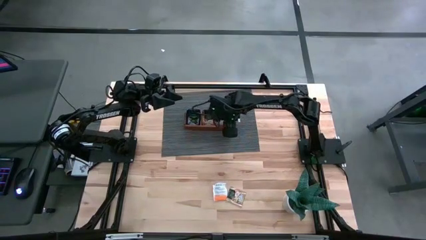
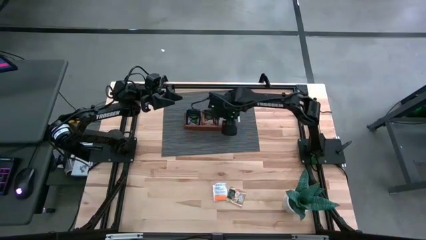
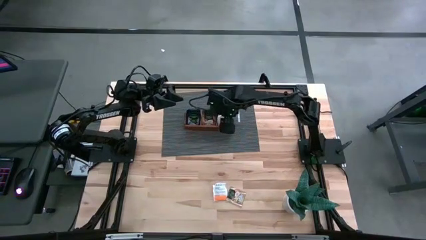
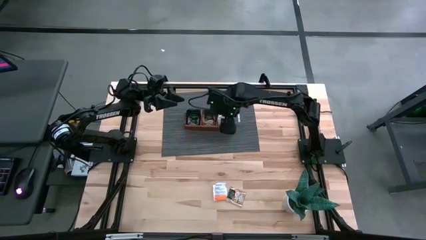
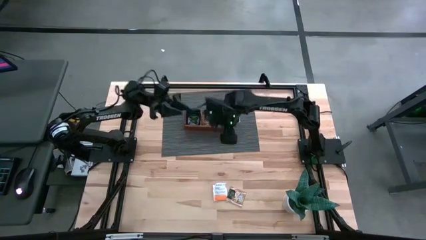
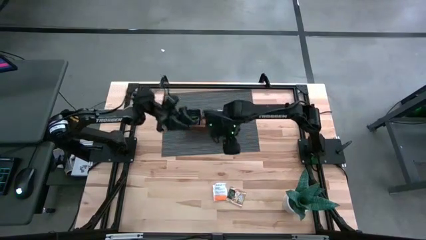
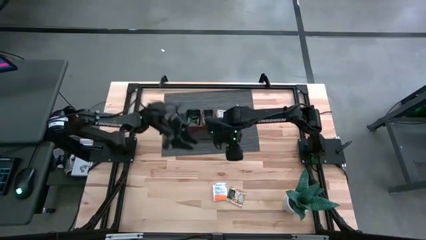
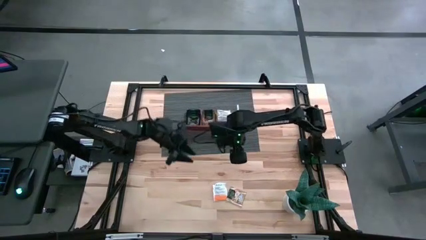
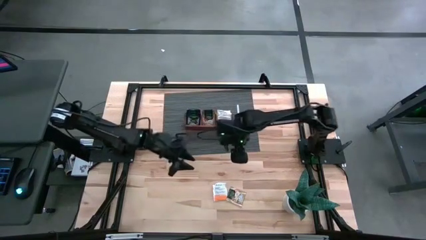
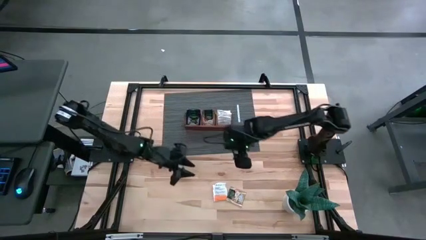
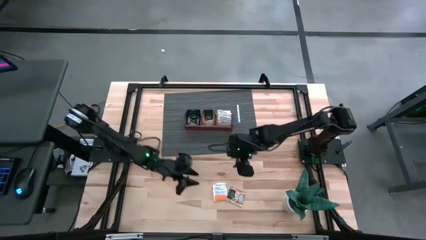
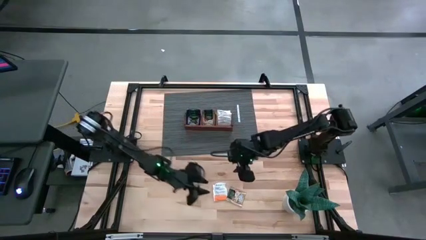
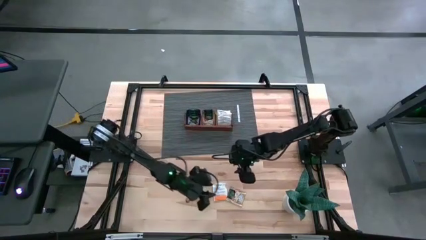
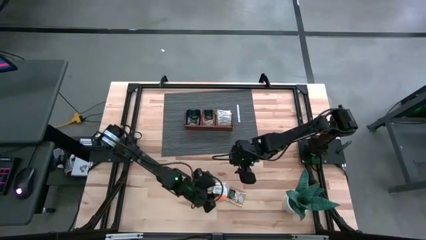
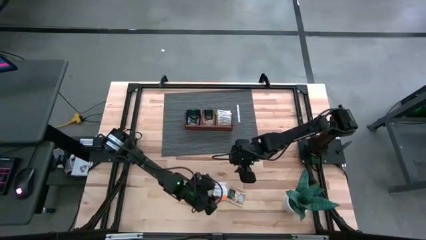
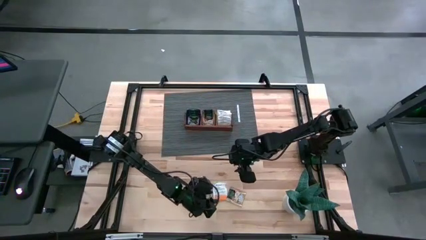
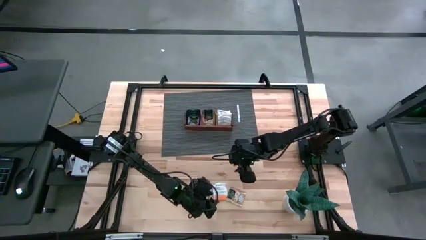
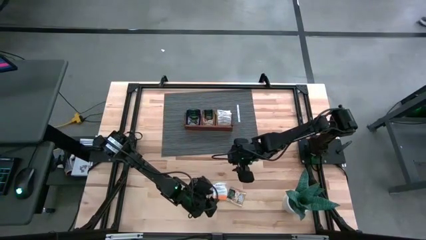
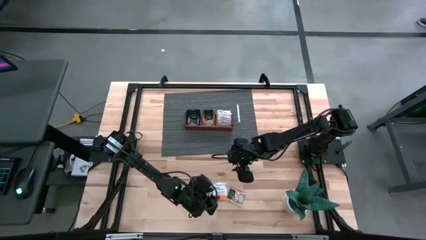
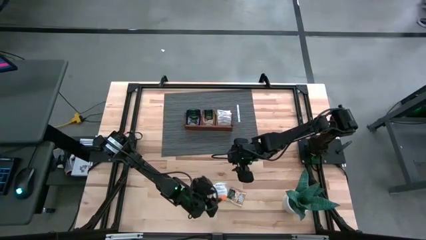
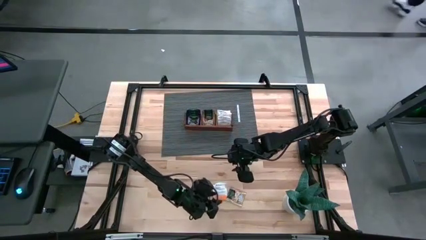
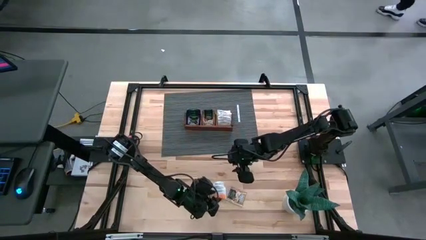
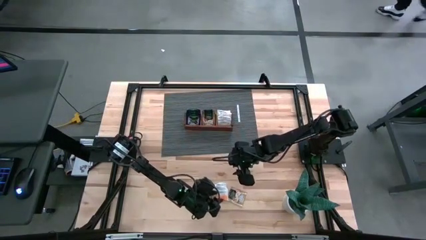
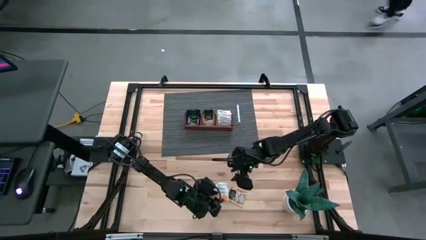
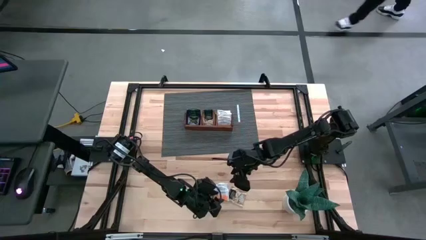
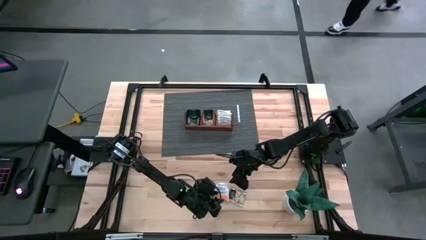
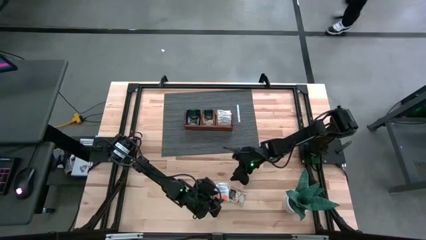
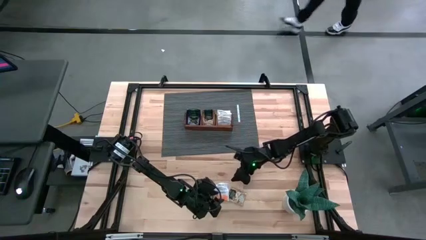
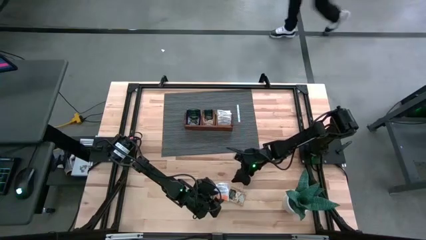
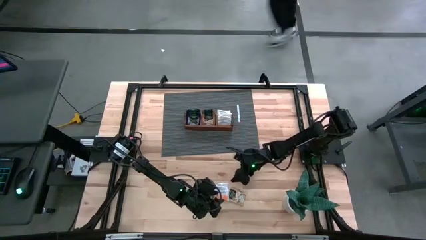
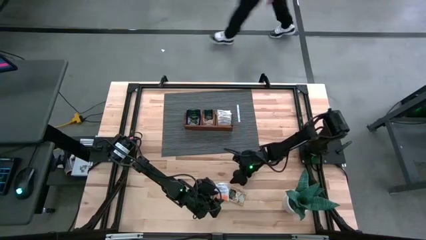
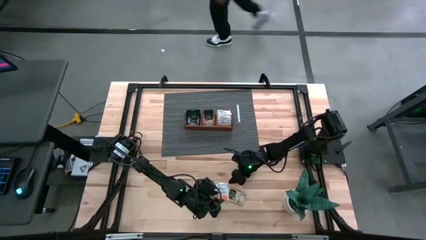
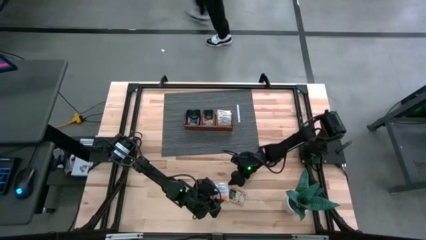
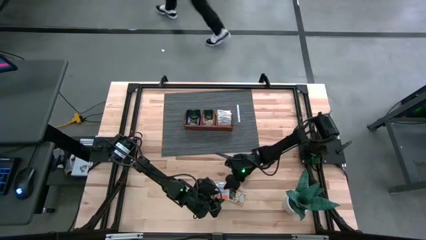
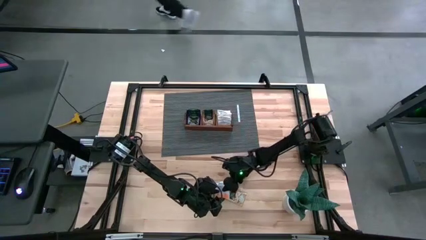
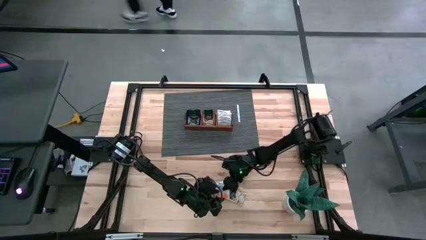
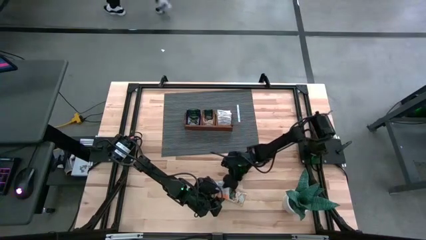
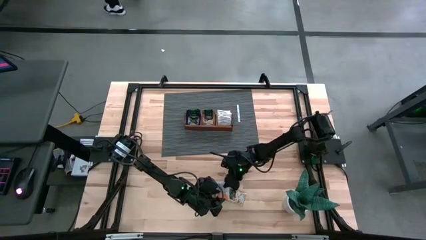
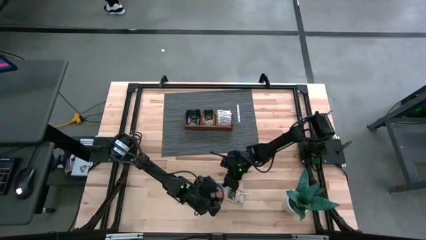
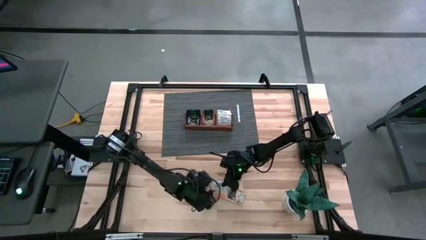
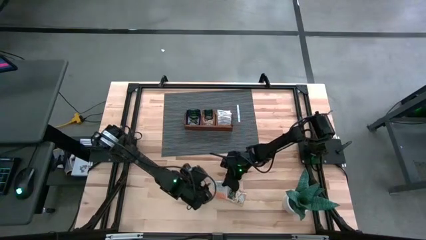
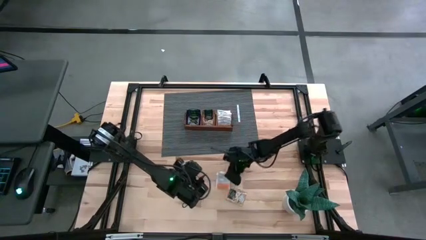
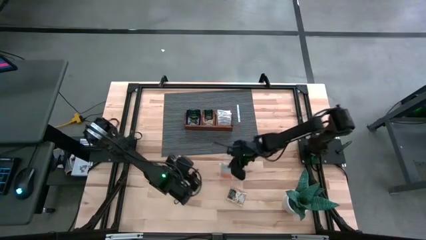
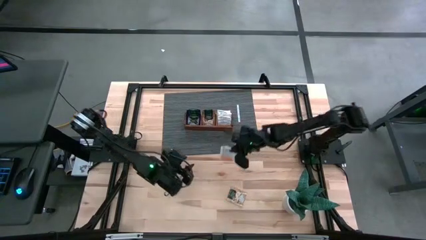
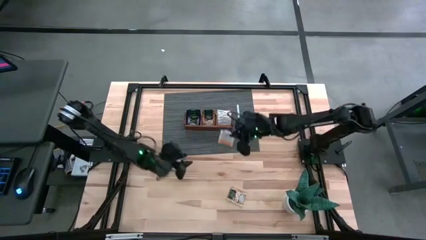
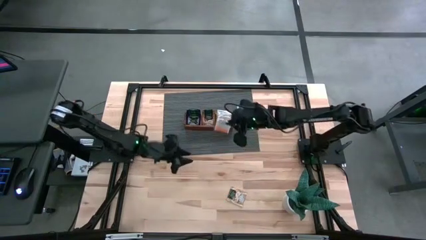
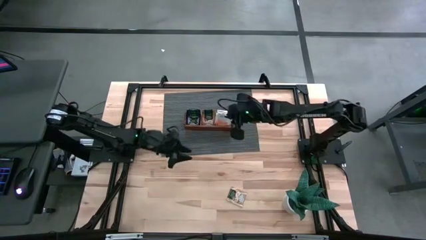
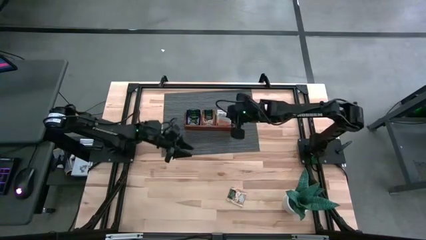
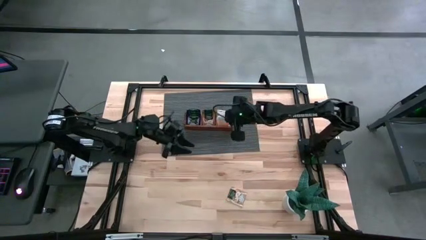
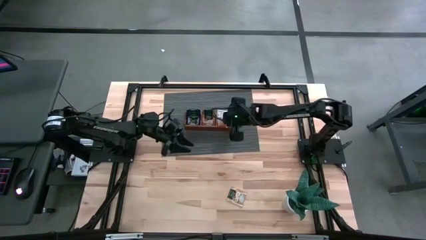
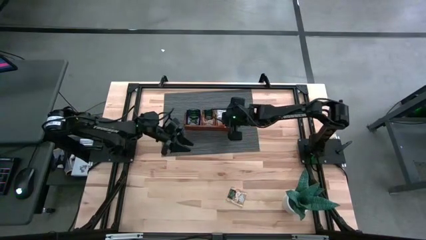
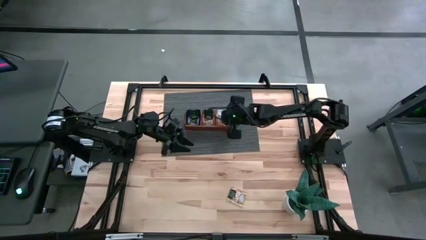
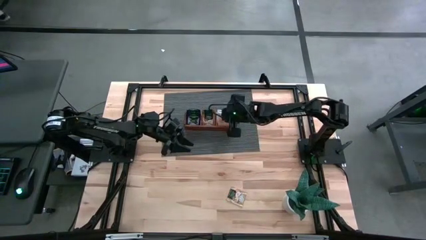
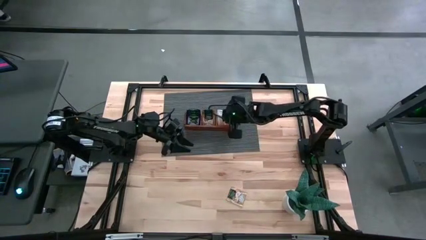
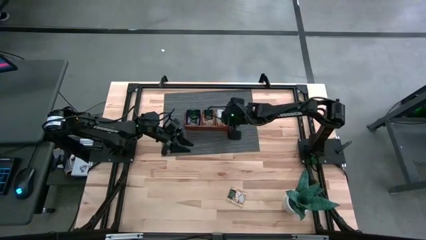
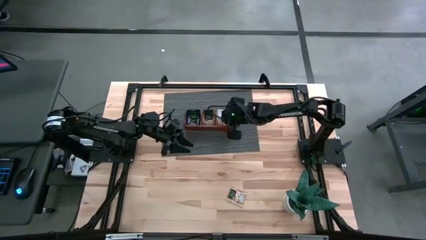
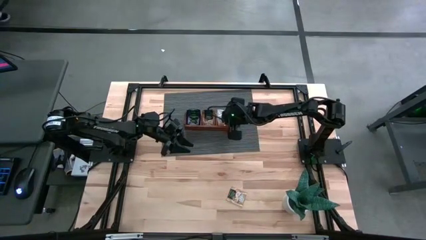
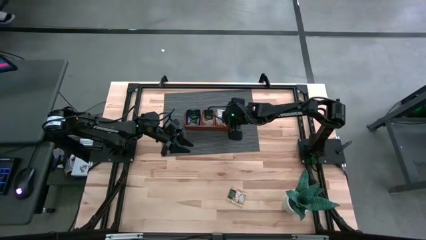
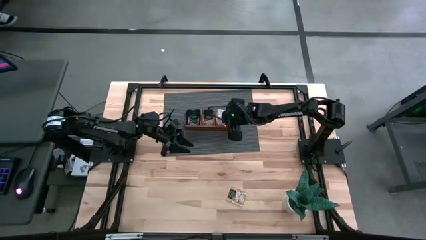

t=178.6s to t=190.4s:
Task: Pick & Place Tea
Put the orange tea bag into the right section of the wooden organizer

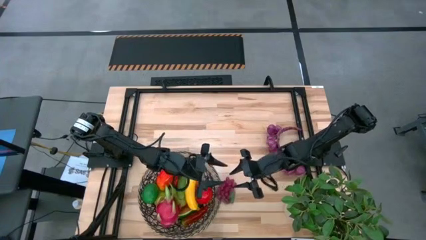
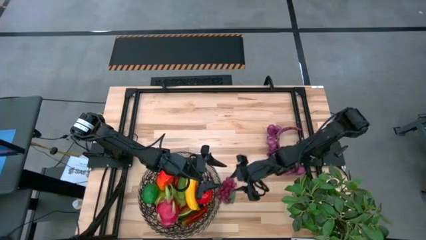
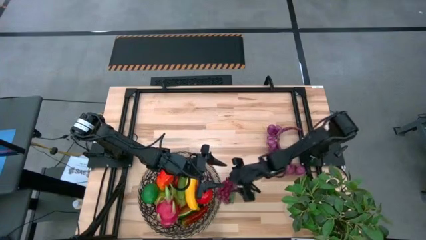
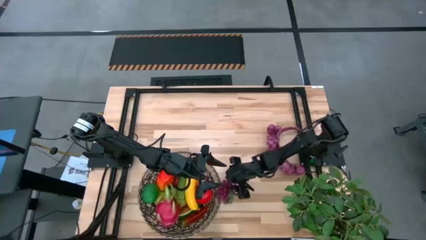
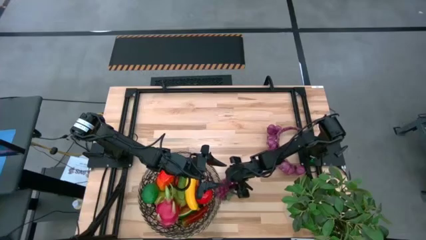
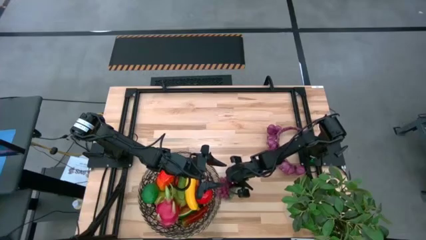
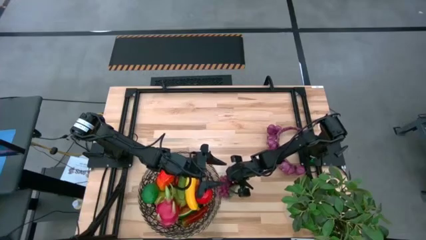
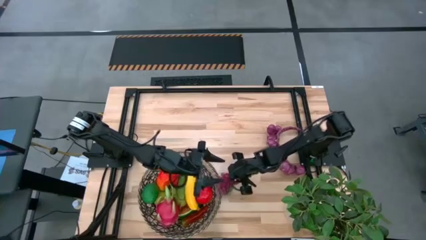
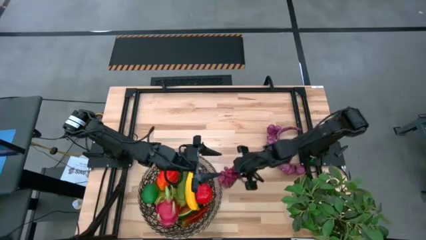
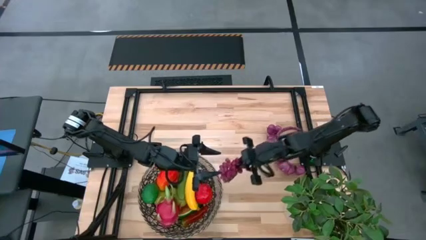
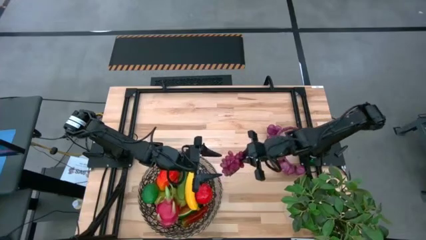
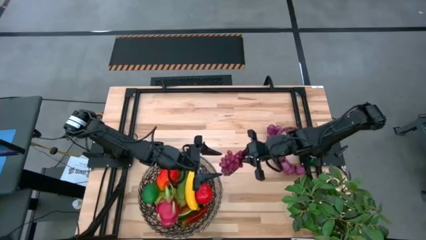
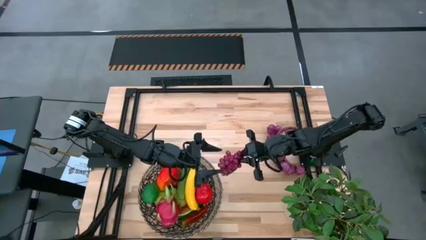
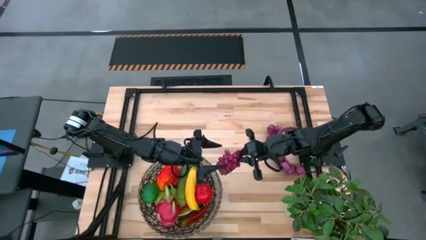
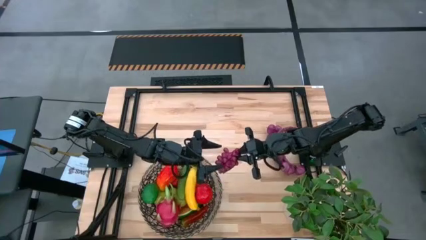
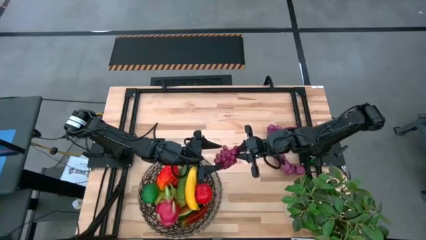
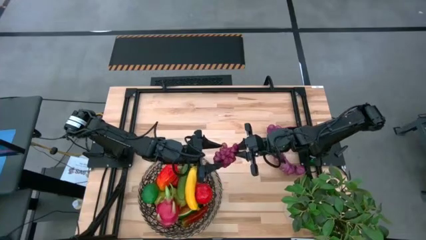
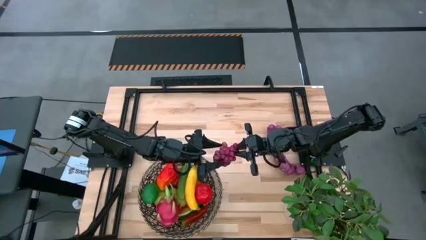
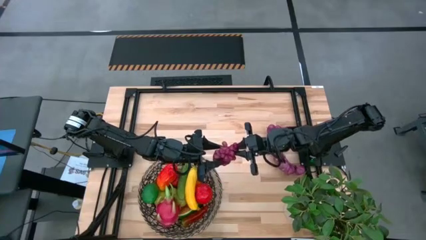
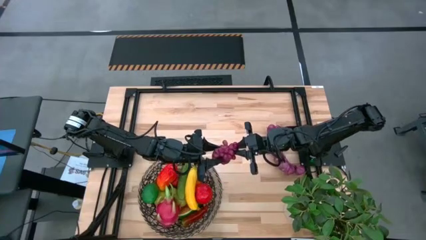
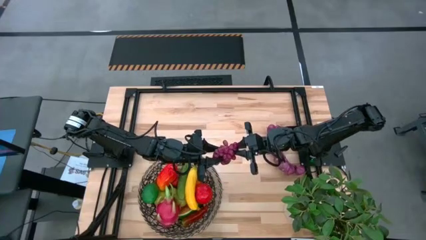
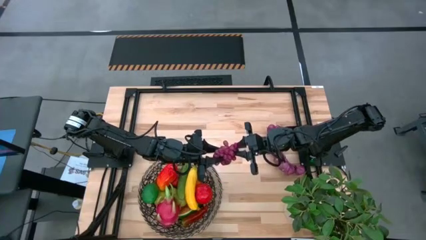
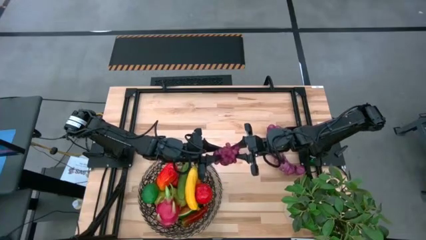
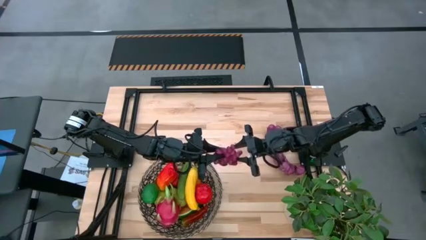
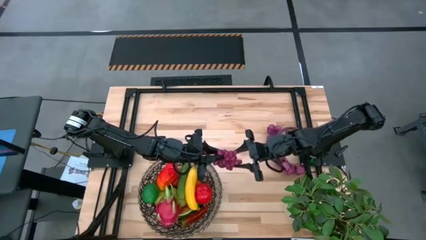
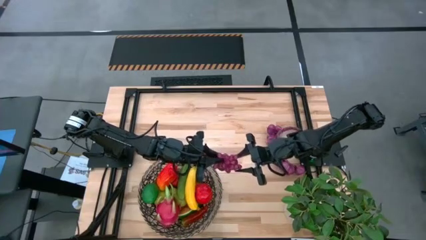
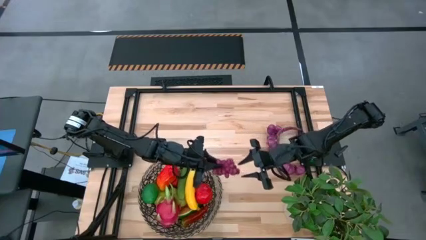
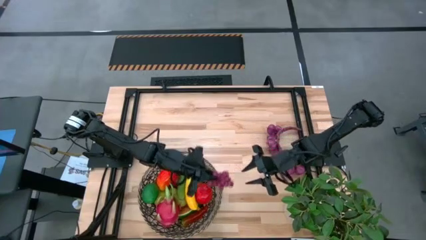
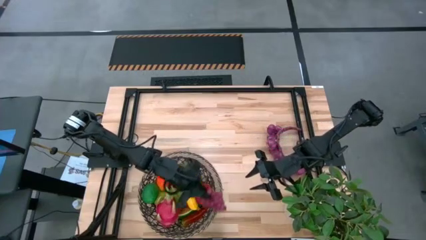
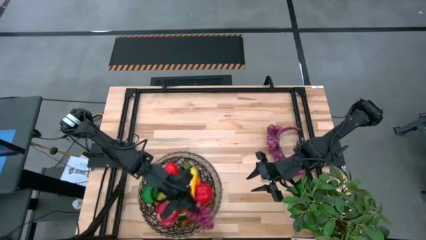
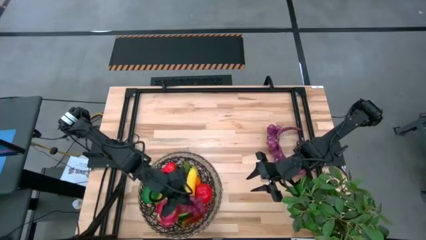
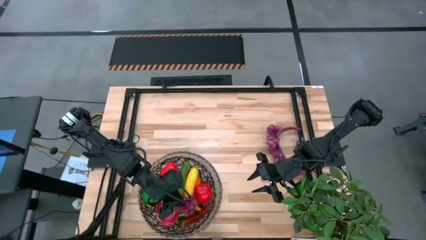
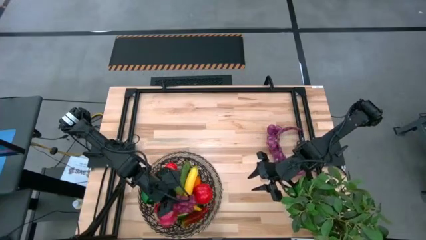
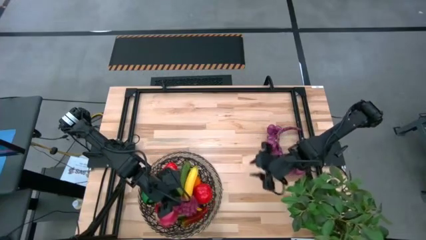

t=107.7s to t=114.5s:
Task: Build produce basket
Put the grapes into the woven basket
